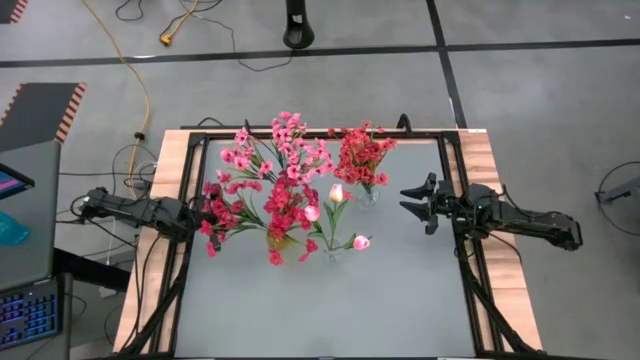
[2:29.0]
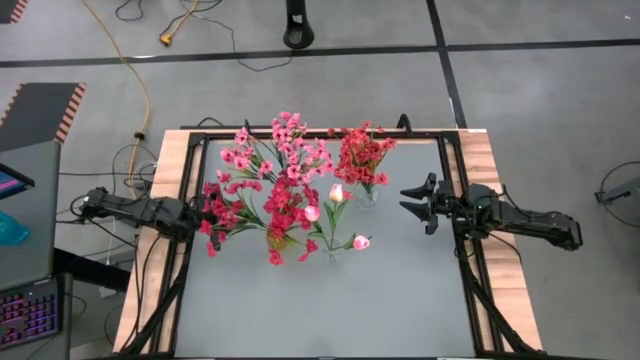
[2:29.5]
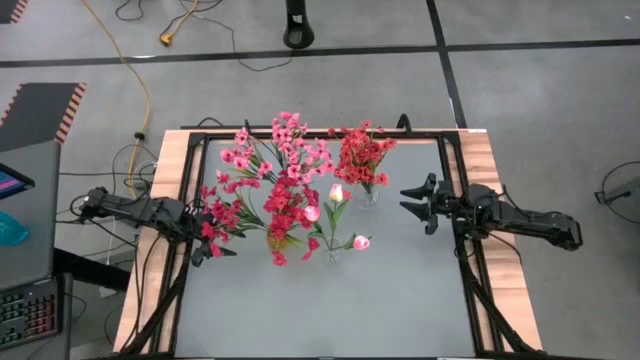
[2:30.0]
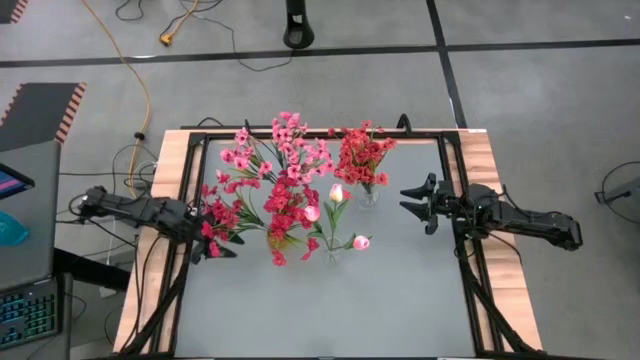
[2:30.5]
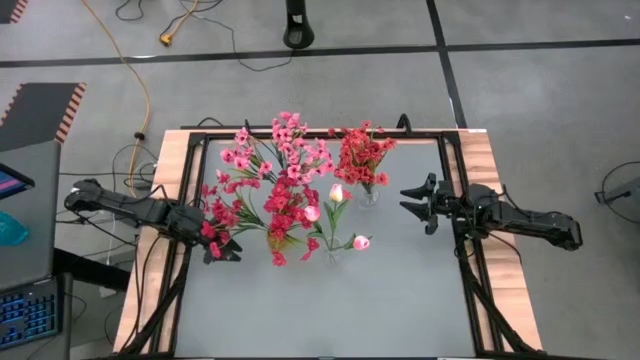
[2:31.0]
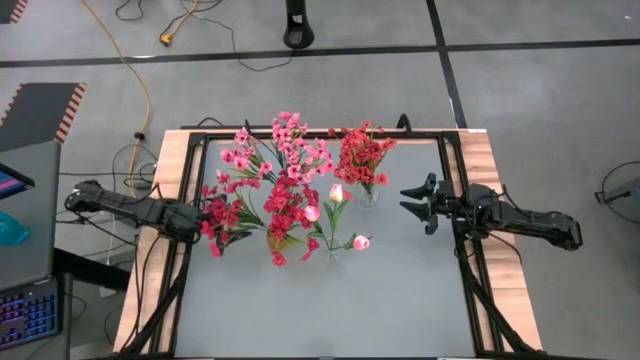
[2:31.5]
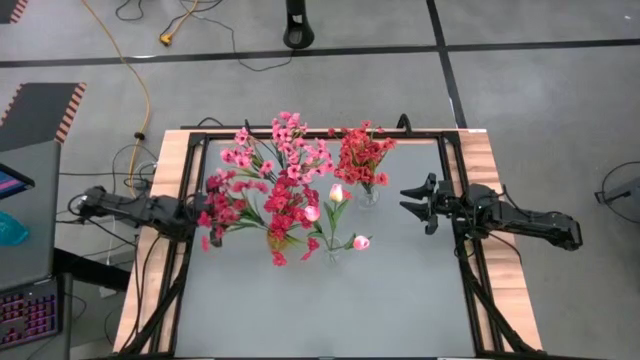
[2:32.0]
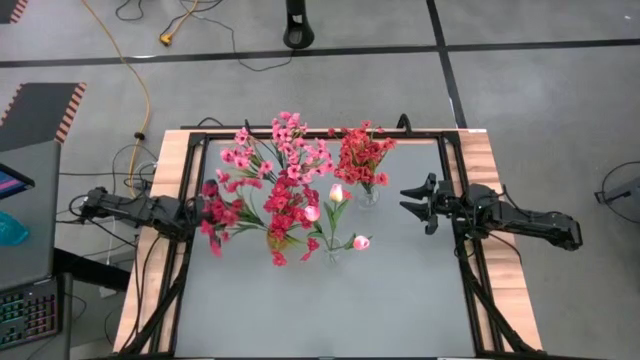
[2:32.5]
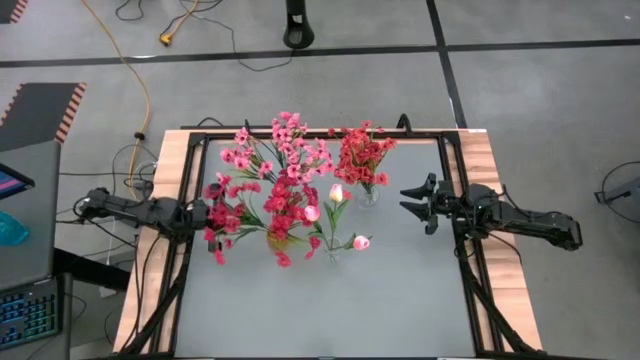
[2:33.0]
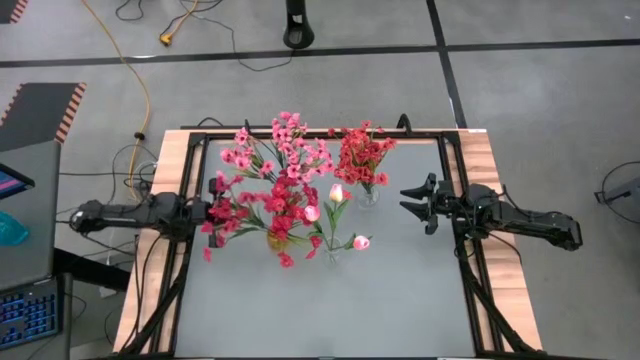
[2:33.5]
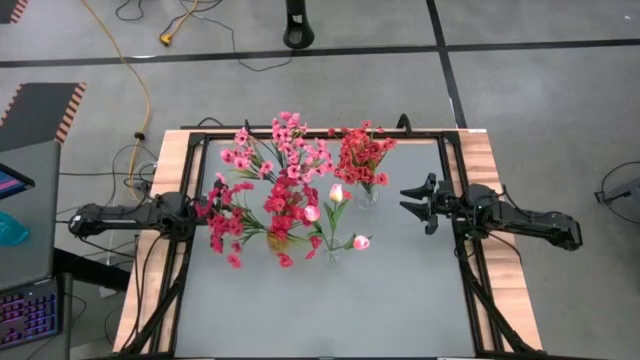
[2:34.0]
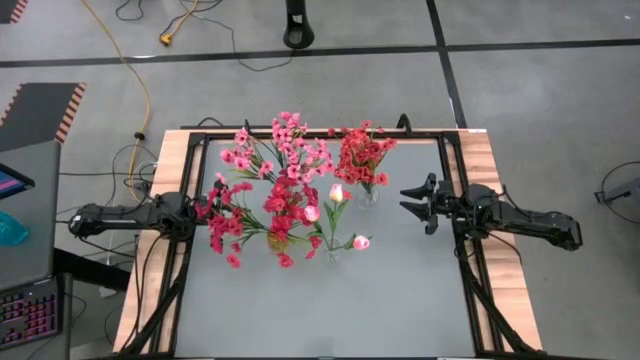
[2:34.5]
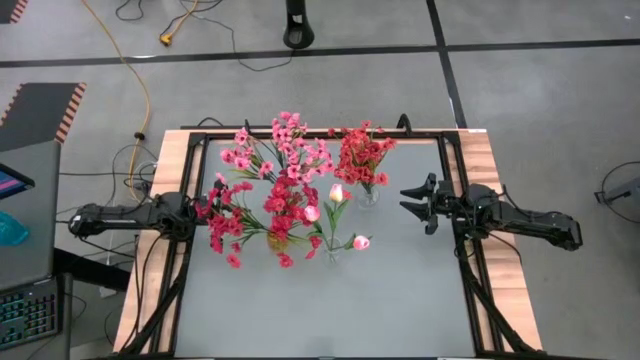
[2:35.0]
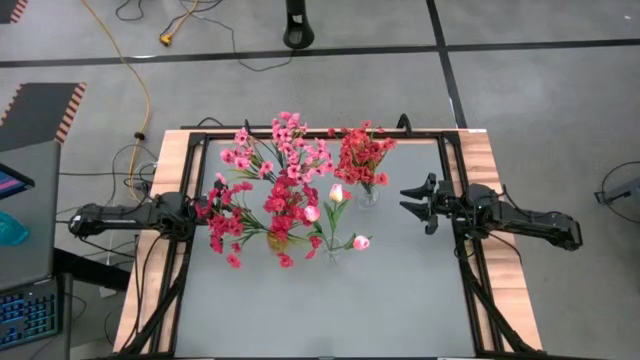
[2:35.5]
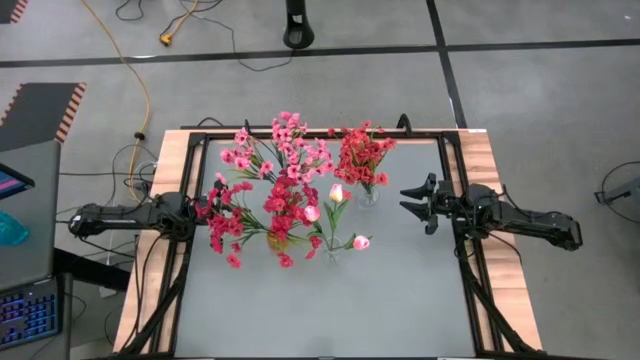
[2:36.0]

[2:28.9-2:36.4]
Task: Sort flowers into vase by color
Return to Home Position

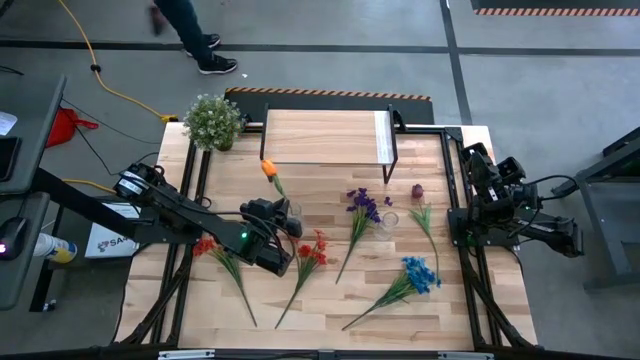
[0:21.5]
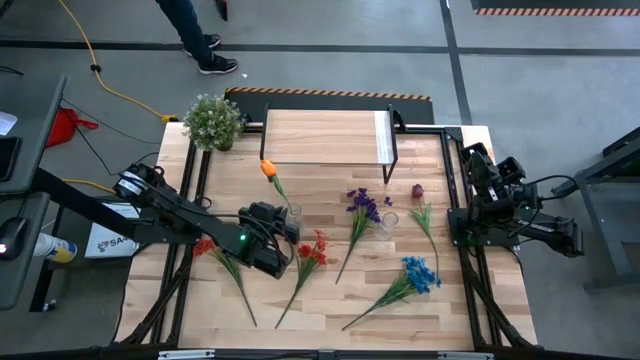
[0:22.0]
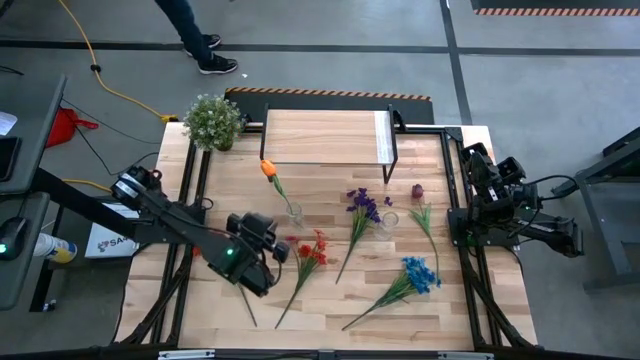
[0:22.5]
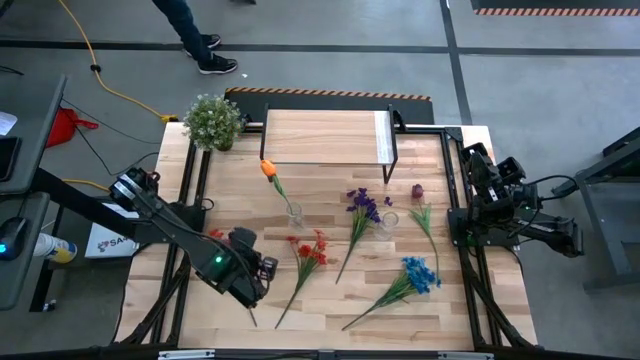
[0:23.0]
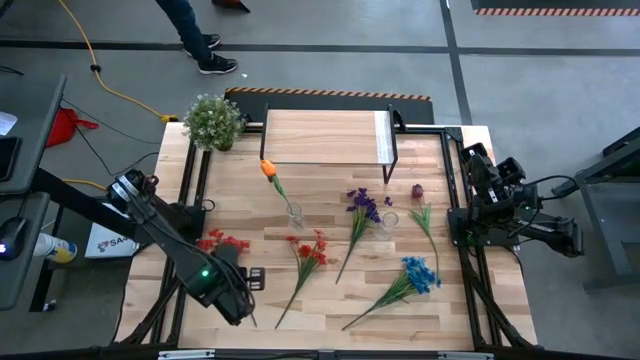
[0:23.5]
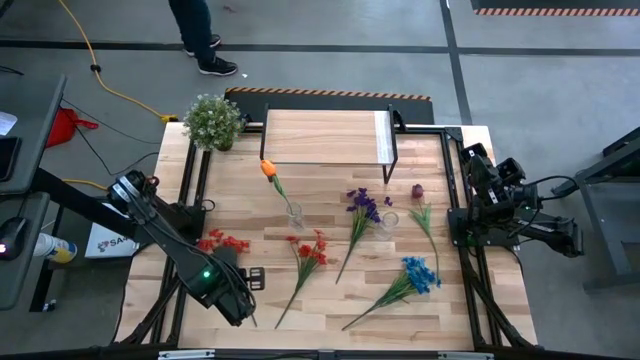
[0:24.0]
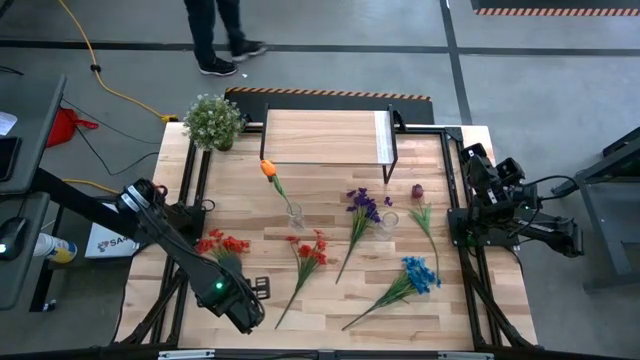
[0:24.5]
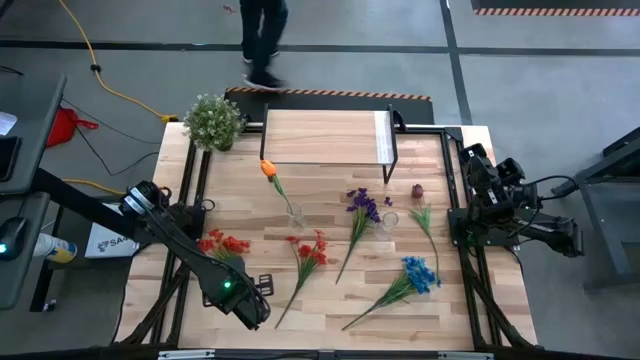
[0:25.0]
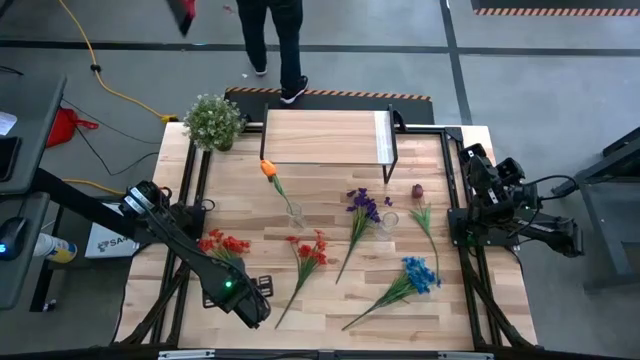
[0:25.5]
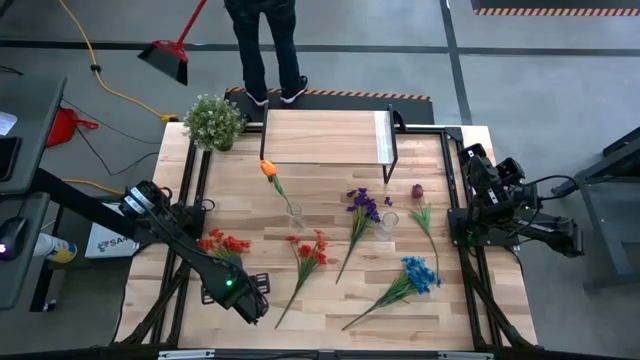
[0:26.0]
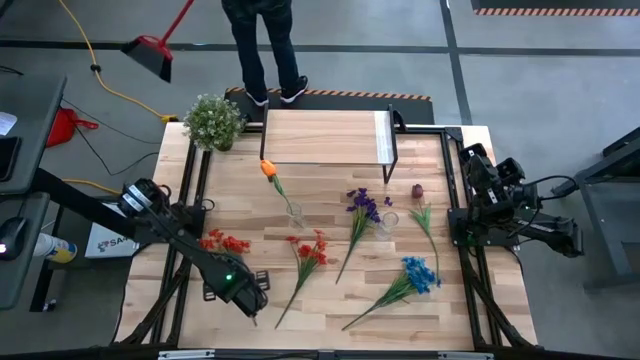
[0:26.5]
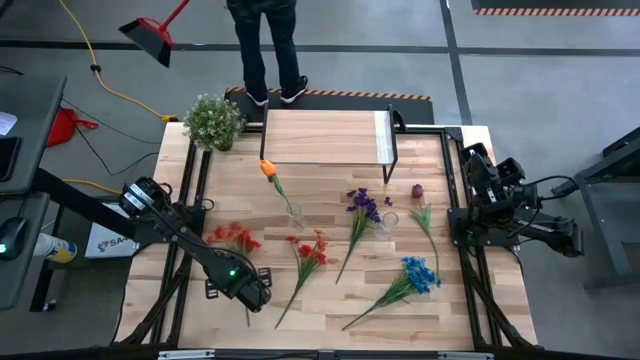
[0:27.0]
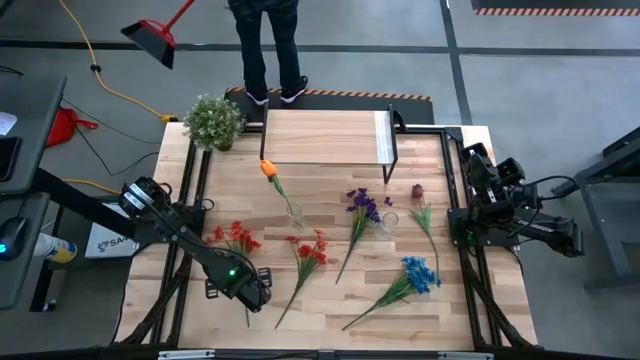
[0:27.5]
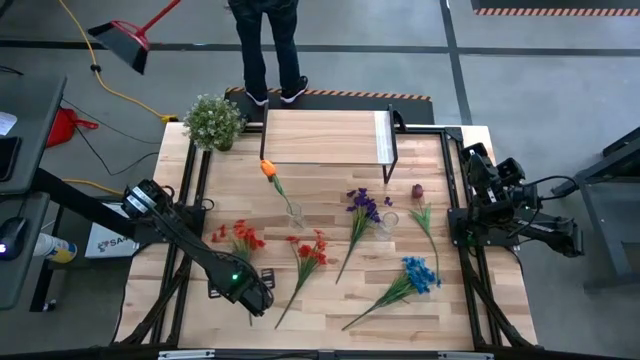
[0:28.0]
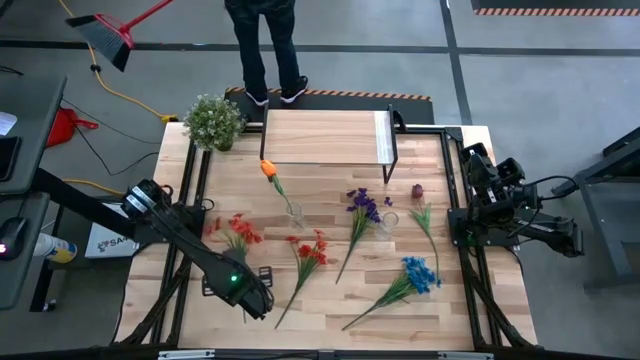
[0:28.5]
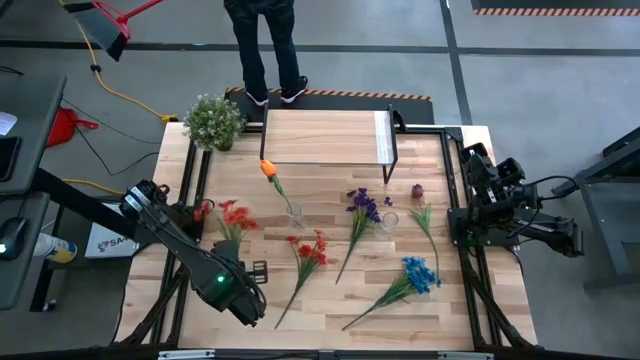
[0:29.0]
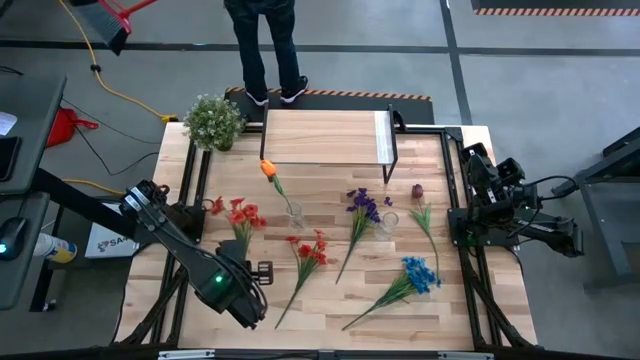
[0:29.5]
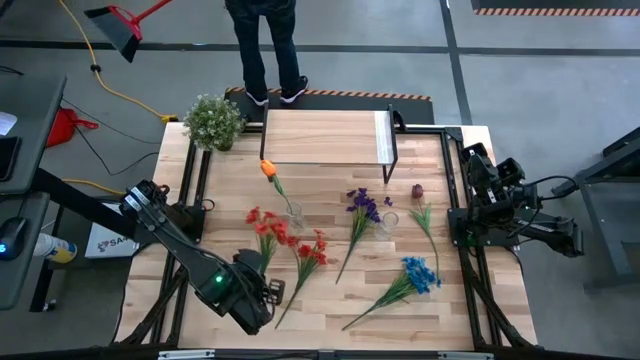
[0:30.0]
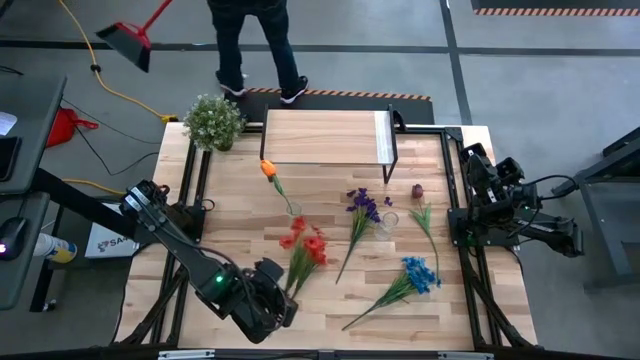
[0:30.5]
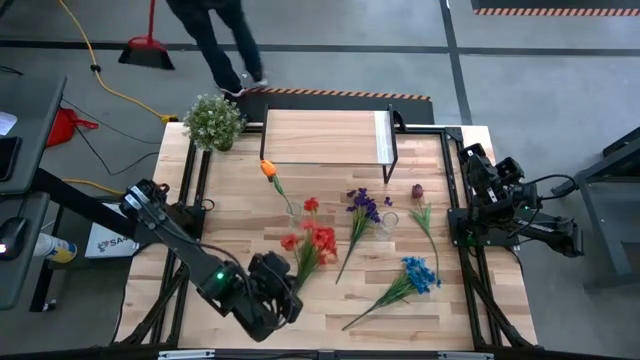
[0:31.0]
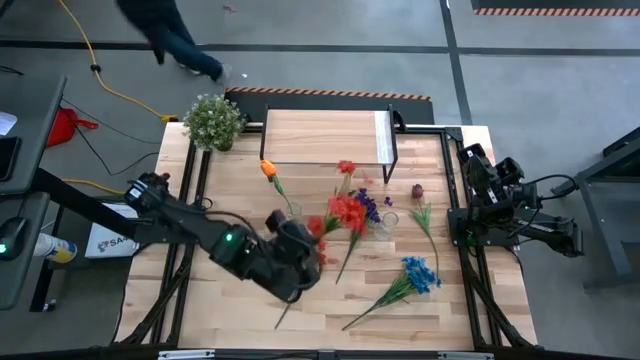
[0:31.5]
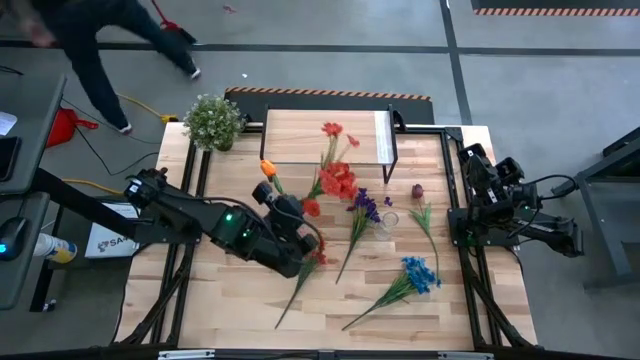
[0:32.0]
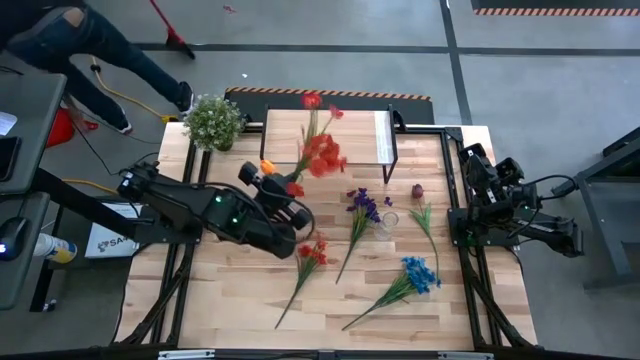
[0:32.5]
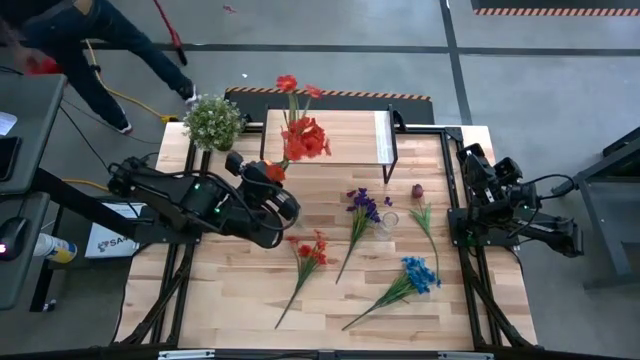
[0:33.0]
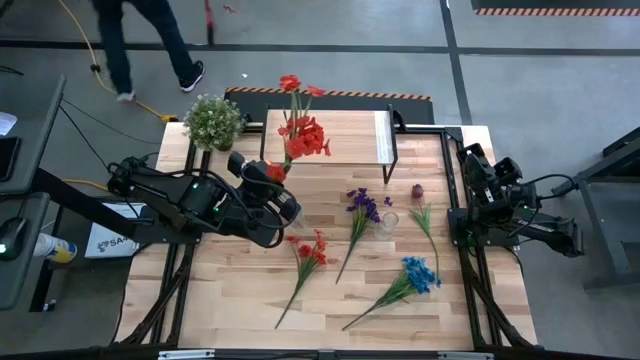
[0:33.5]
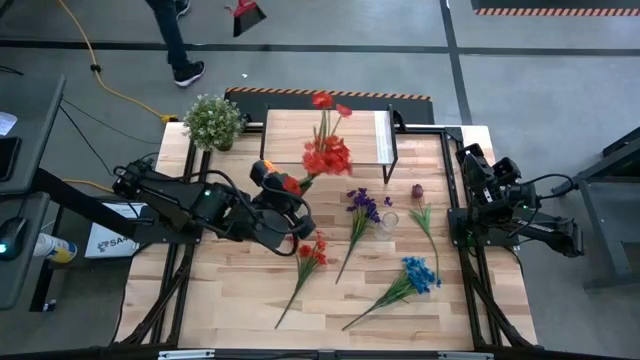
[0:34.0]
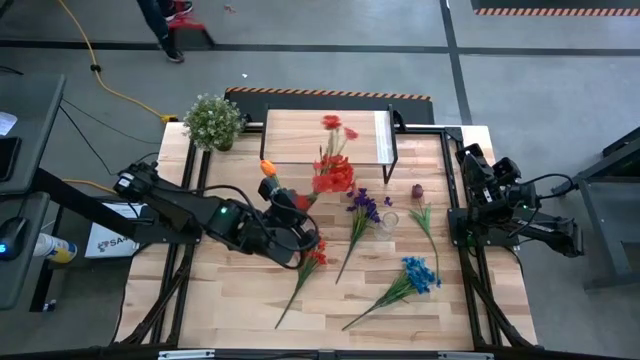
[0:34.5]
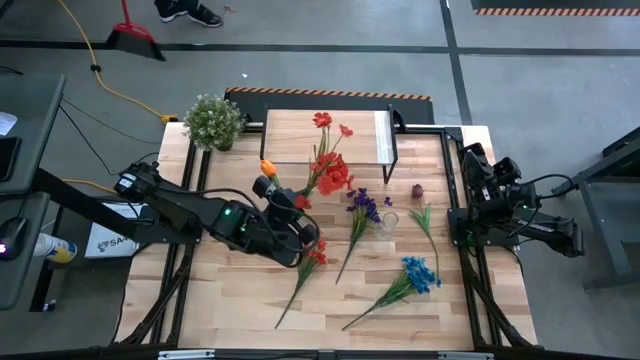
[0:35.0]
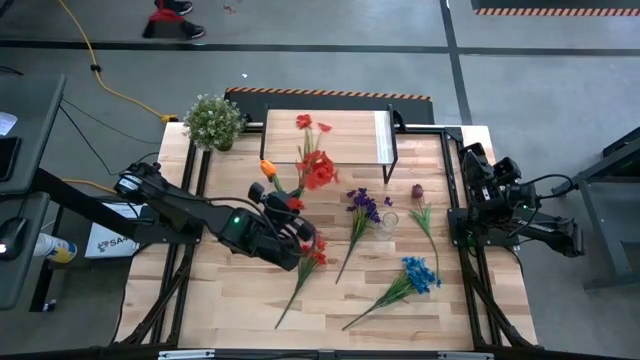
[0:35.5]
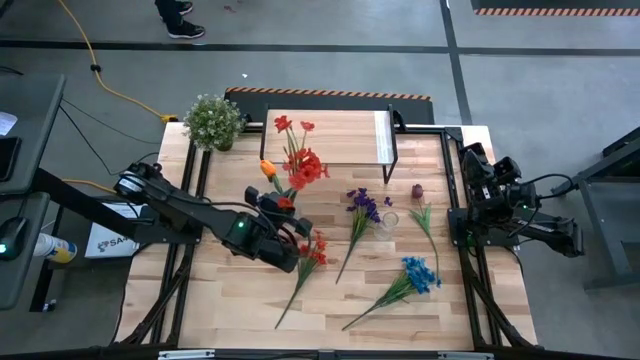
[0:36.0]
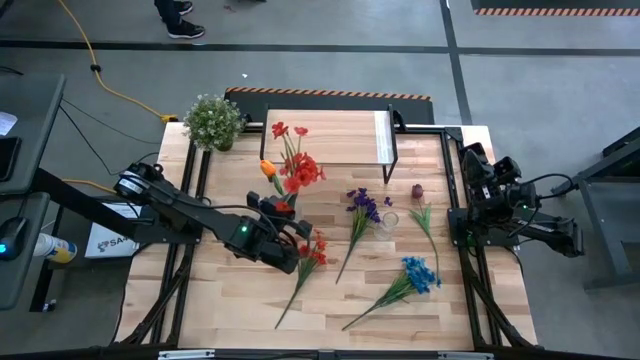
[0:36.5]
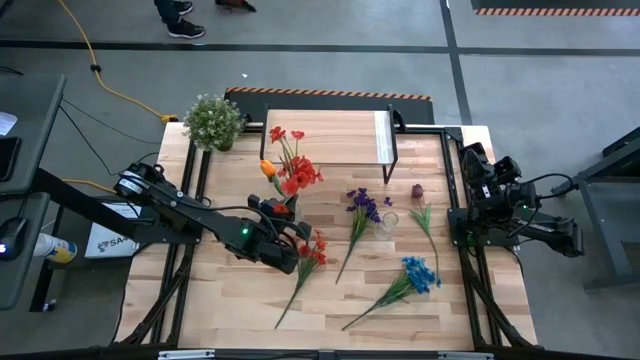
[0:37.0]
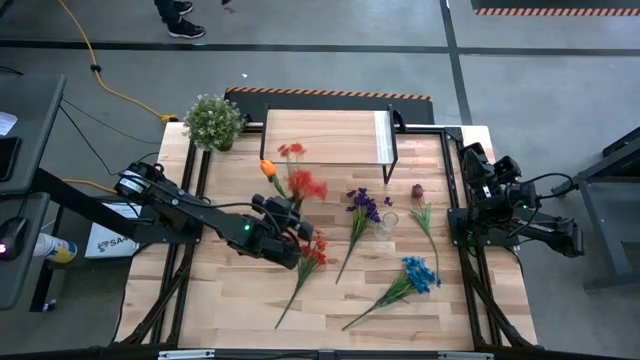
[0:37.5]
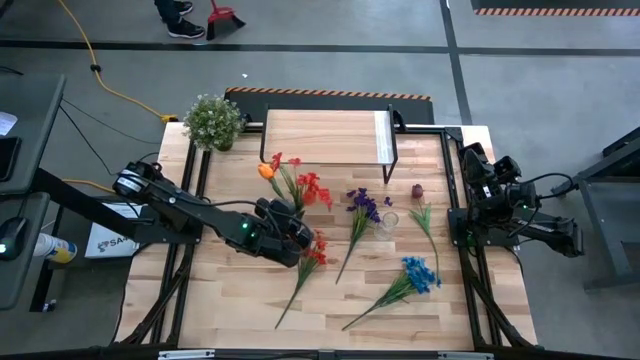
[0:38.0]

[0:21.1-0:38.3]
Task: Pick and place flowers into a vace then onto a shelf
Put the left orange flowers into the left transparent vase
